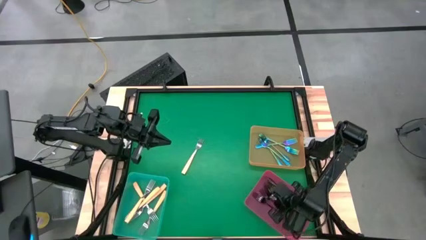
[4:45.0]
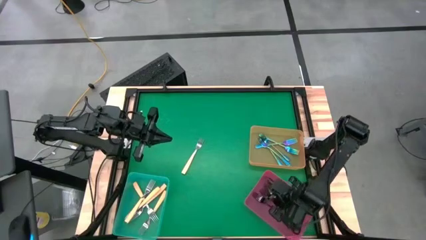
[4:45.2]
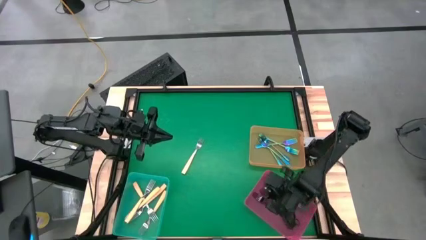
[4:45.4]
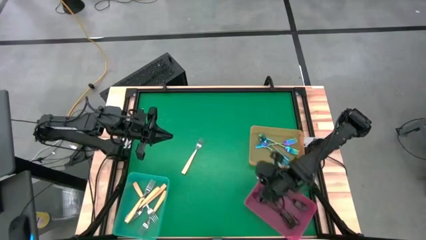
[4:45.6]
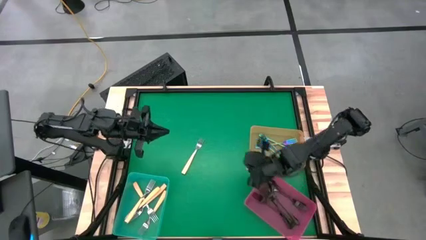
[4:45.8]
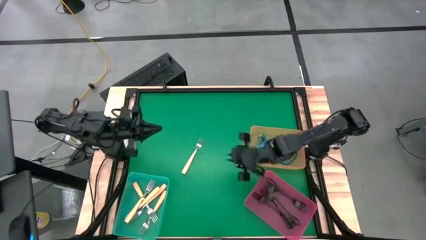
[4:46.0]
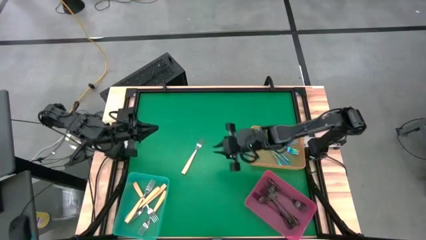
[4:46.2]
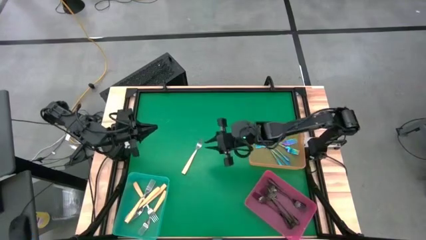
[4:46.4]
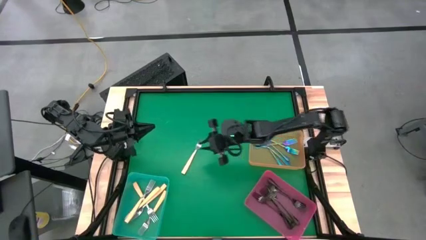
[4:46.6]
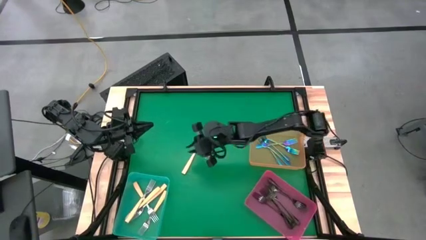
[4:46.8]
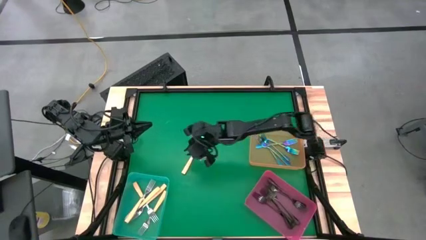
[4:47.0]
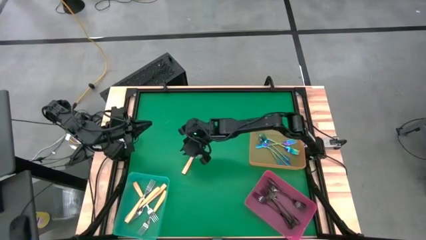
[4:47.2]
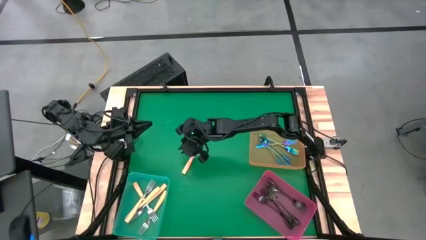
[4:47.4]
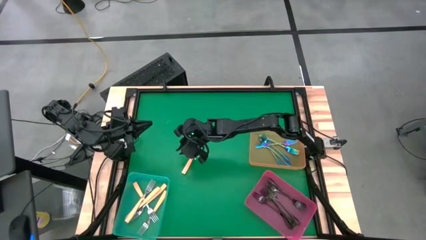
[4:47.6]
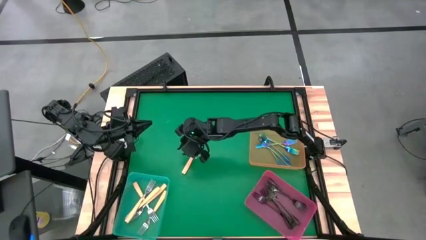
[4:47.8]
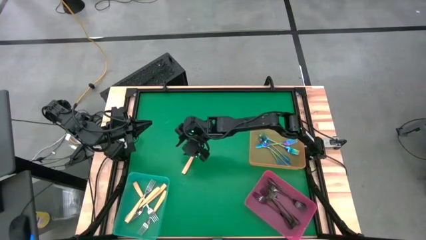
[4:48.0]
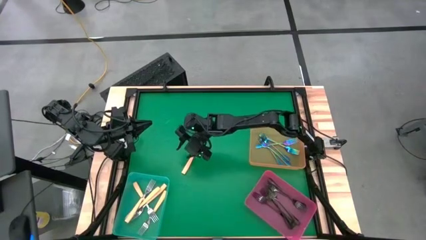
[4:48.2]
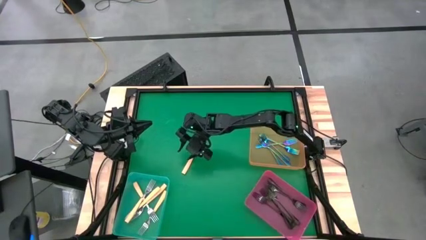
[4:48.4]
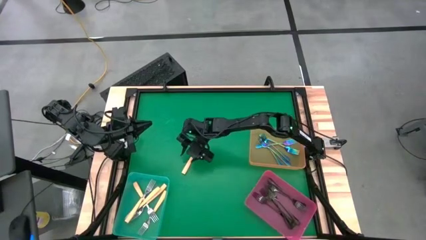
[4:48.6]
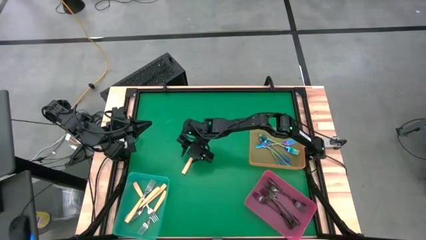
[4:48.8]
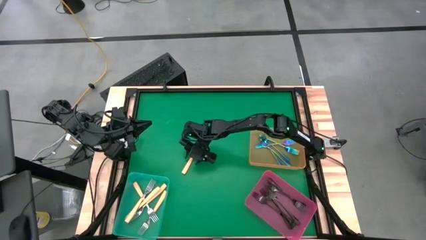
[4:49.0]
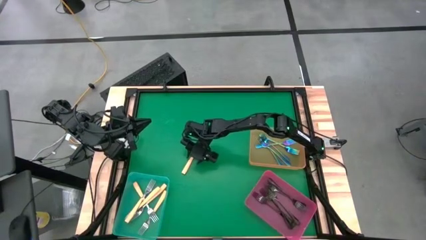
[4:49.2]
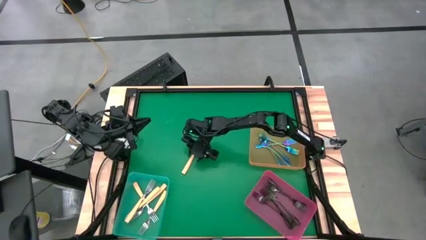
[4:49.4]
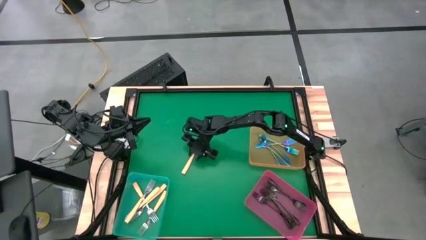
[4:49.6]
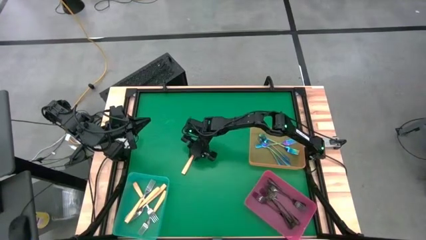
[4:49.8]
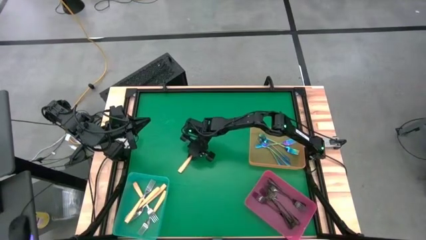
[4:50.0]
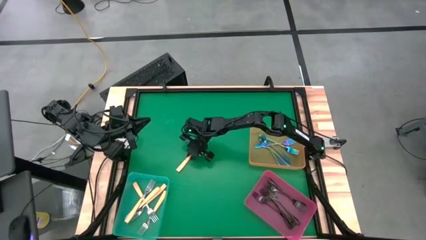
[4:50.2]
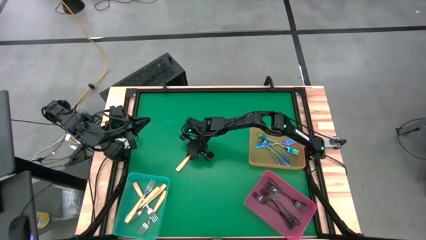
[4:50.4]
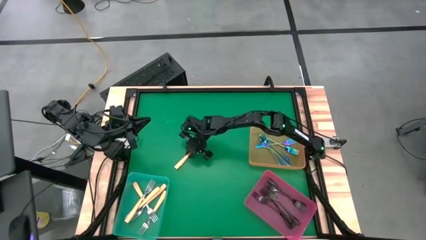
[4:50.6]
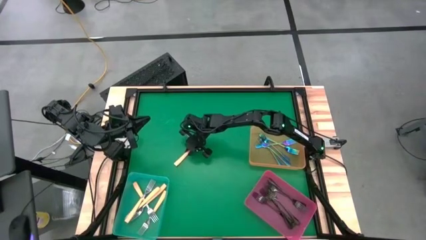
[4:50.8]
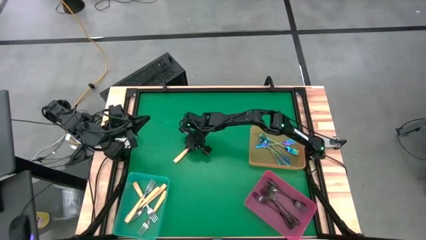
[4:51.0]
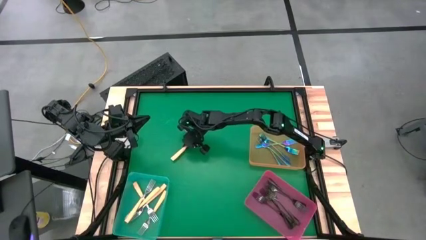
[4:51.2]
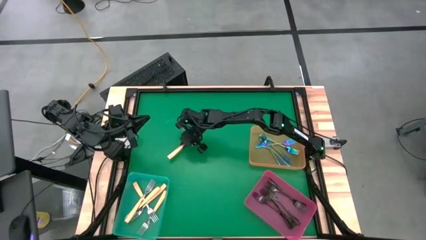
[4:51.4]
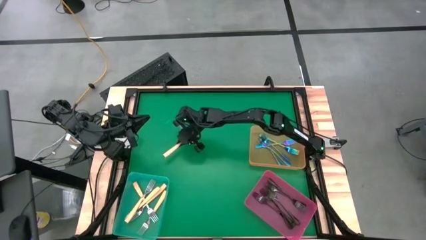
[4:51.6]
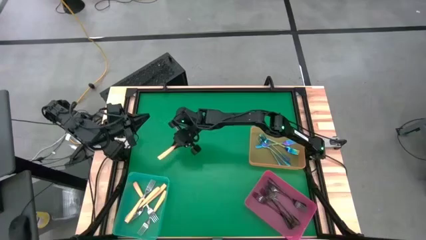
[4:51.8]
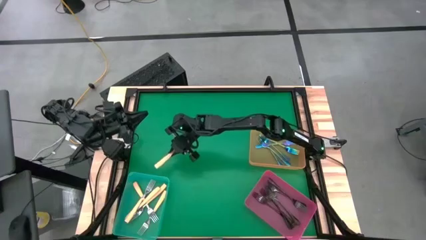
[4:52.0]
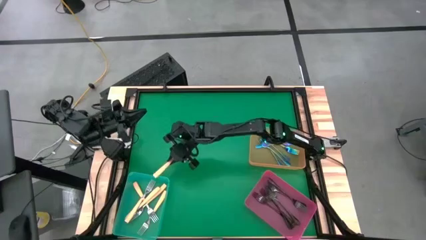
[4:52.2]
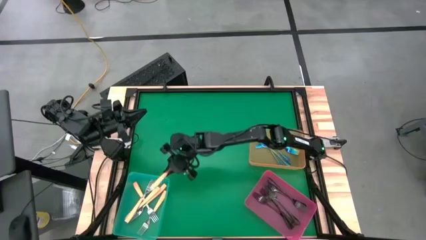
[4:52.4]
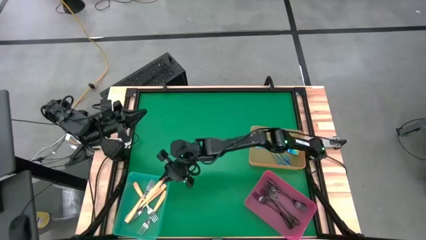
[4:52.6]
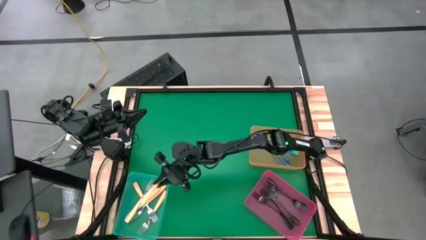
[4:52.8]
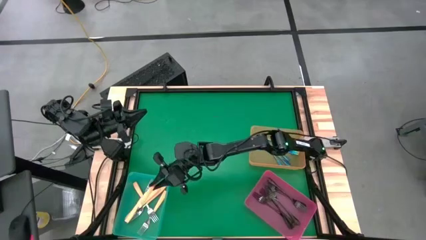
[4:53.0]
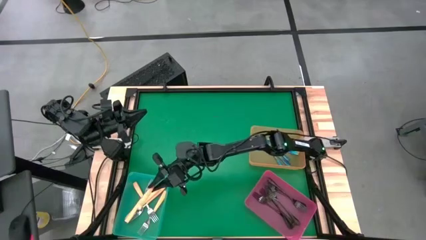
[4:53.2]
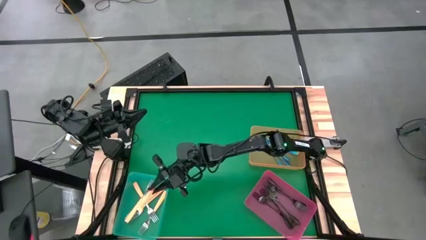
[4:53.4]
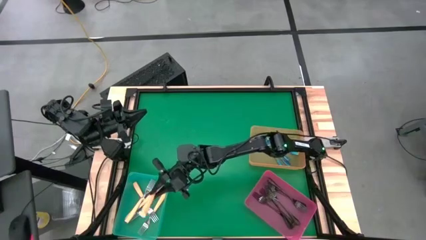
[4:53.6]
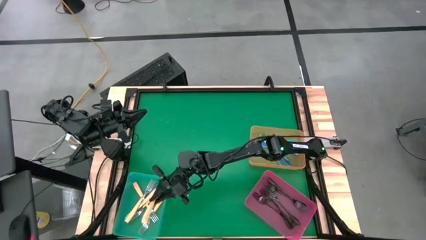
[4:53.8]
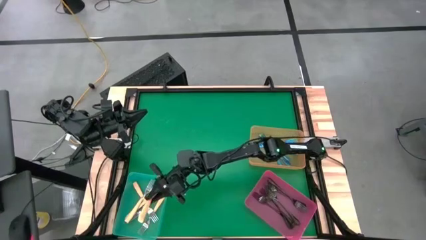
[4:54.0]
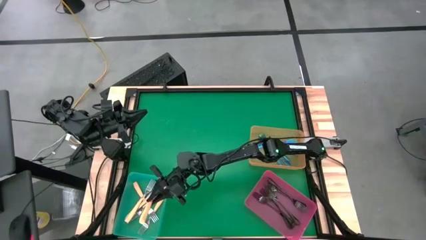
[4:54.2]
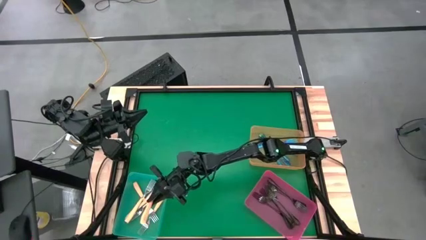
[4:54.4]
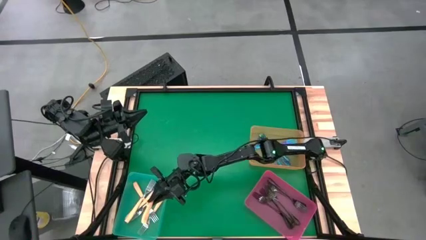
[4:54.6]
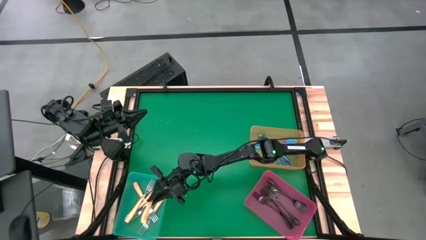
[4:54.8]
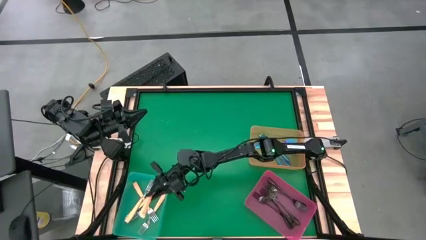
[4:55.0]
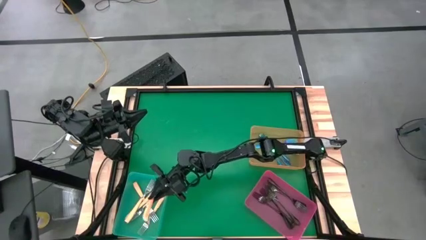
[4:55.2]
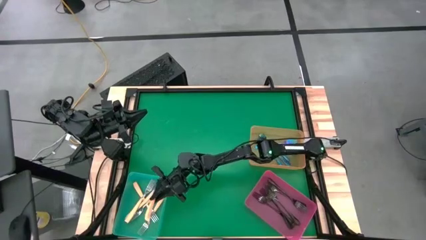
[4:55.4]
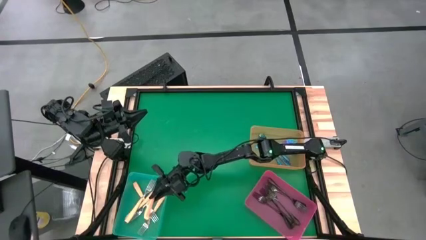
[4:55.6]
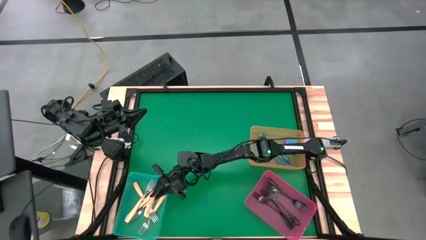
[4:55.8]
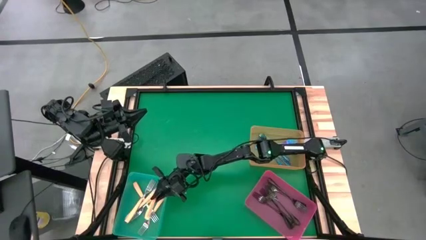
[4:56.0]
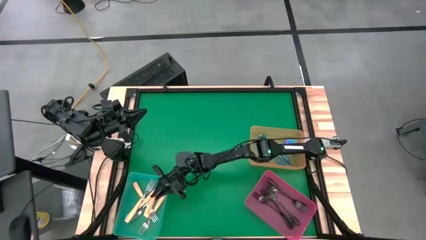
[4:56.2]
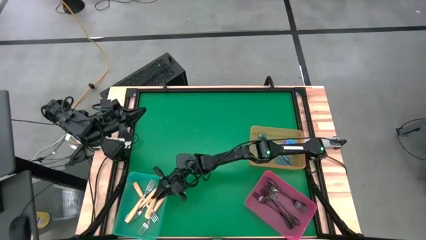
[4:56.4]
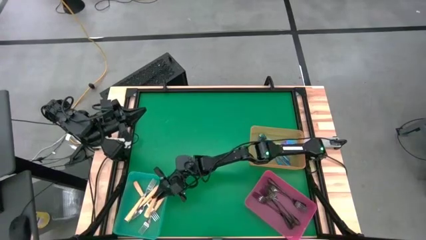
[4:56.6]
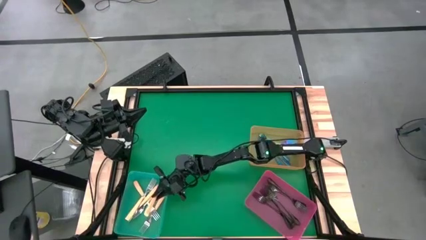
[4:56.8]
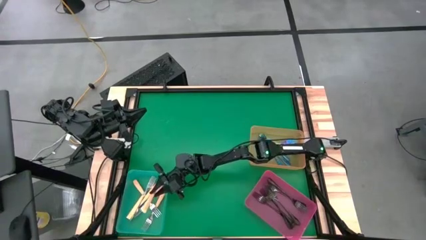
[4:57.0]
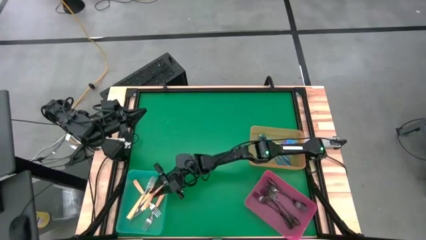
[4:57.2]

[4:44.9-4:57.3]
Task: Sort silverware by color (type)
Put the yellow fork into the blue bin

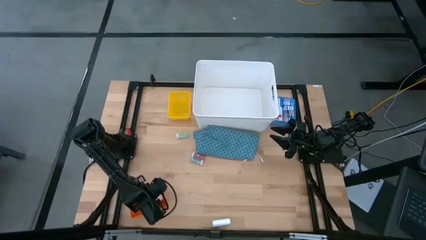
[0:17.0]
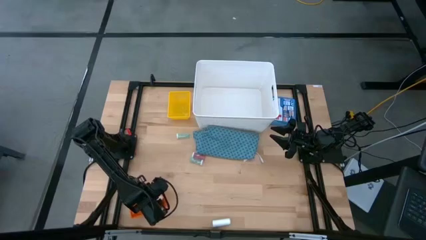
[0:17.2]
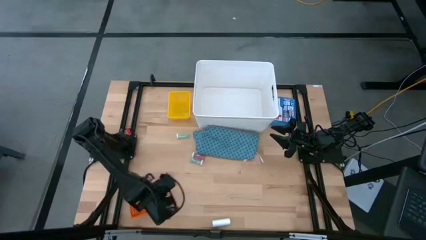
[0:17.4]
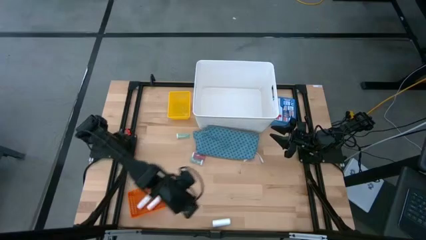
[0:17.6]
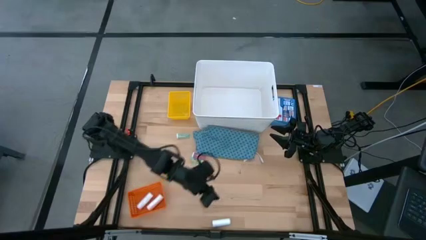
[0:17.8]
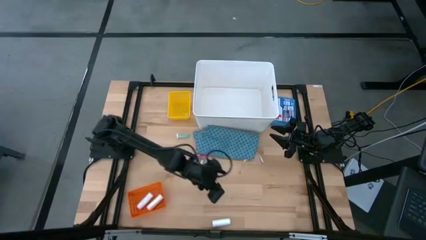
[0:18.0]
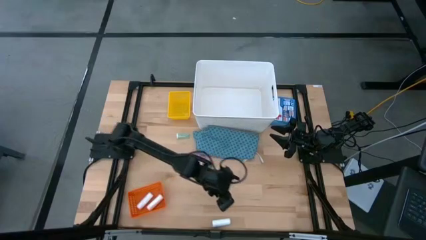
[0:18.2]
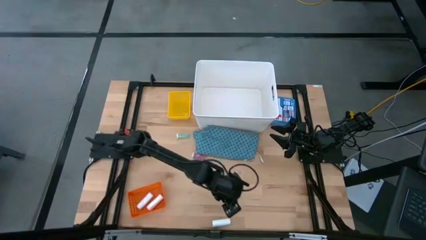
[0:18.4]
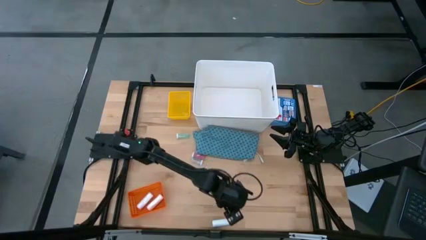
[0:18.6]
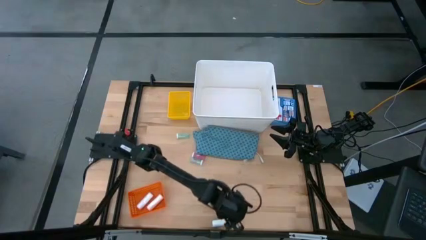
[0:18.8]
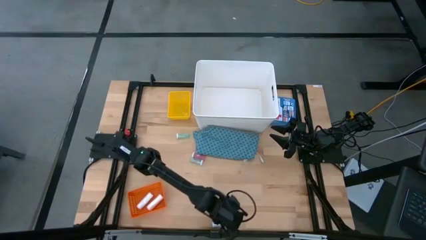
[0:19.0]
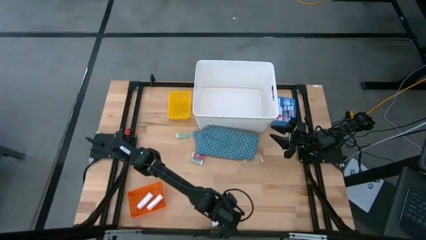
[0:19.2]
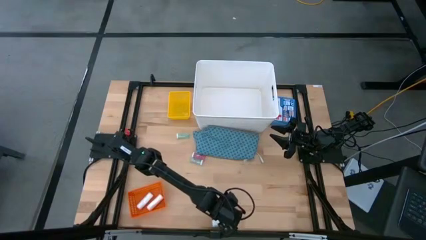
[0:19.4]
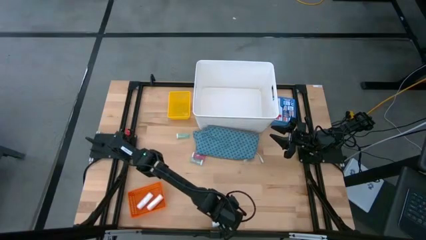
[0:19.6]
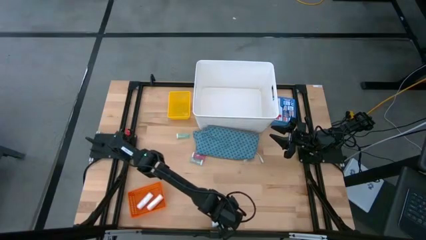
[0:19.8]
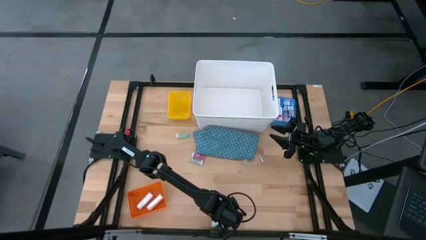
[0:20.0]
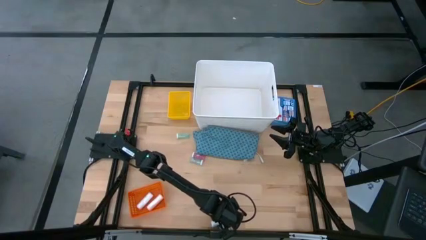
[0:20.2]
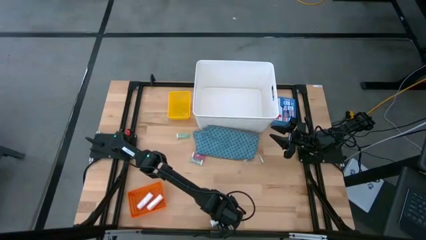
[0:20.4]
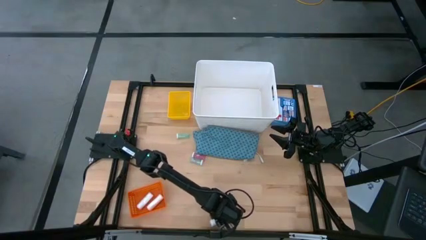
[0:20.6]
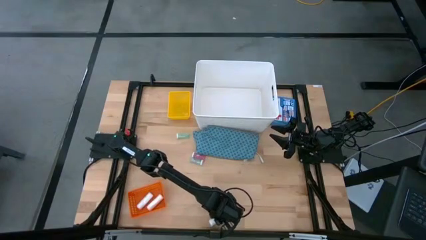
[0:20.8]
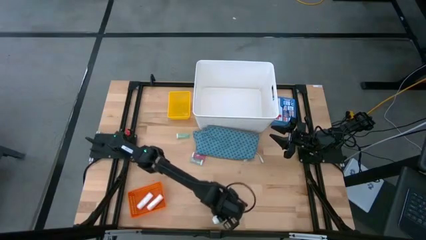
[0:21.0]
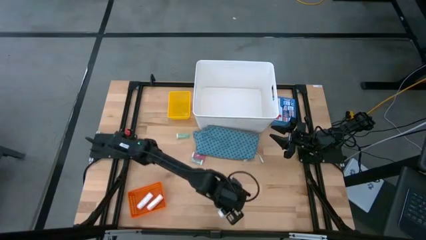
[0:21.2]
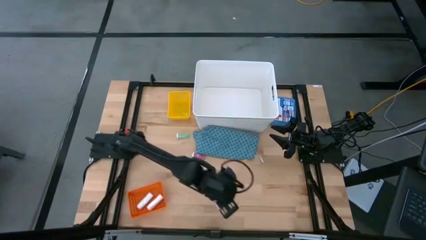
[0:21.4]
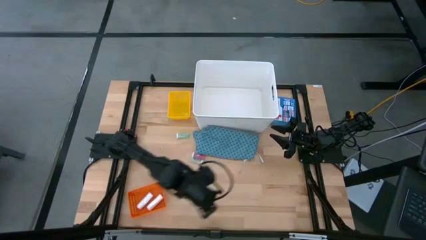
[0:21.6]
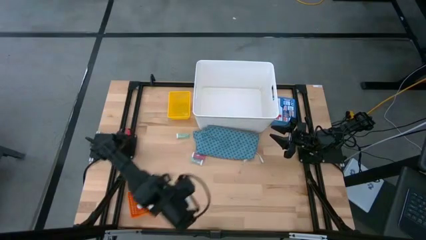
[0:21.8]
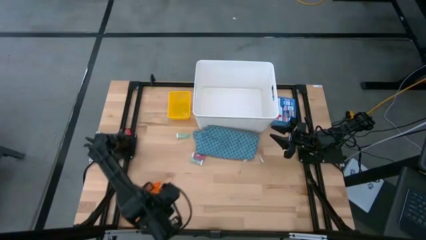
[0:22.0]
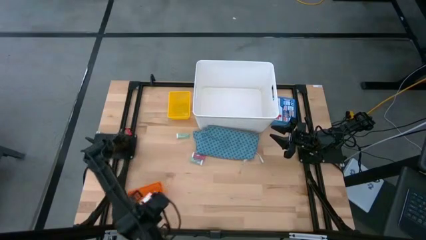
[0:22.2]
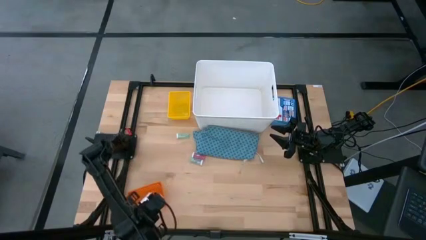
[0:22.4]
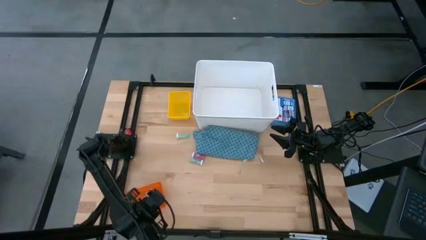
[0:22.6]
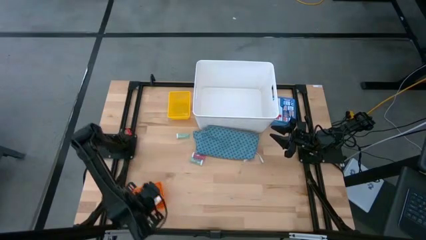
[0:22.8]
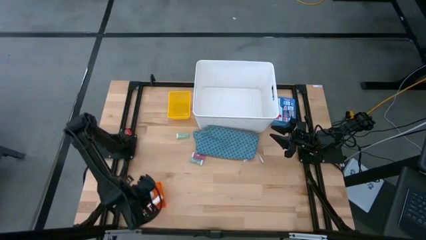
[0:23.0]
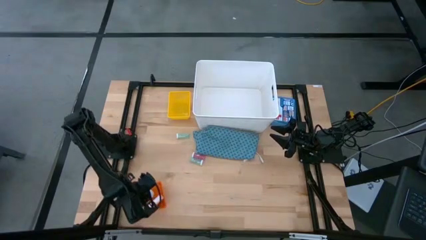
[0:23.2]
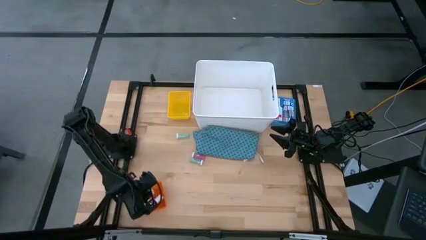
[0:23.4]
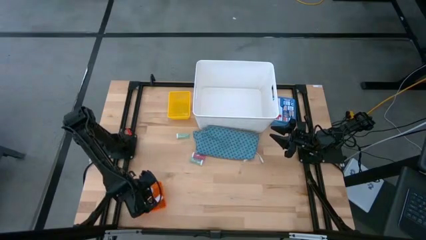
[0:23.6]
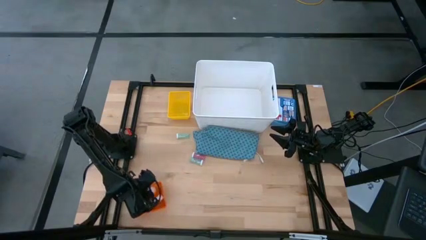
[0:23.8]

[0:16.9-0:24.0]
Task: Pick & place medical supplies in basket/bin
Put the white gauze into the orange bin
